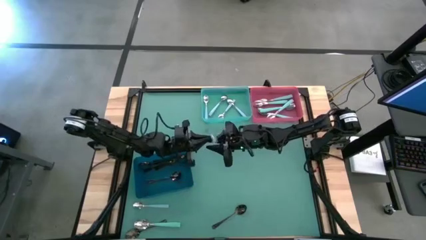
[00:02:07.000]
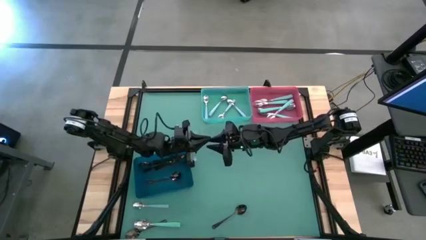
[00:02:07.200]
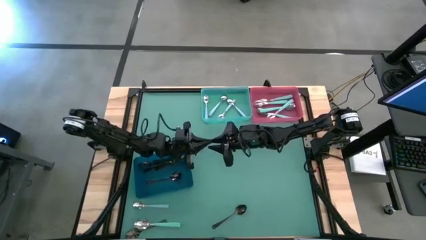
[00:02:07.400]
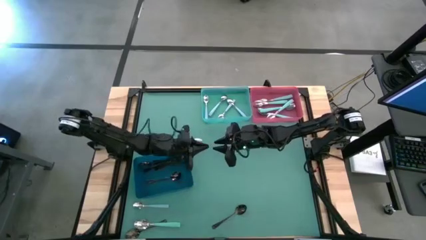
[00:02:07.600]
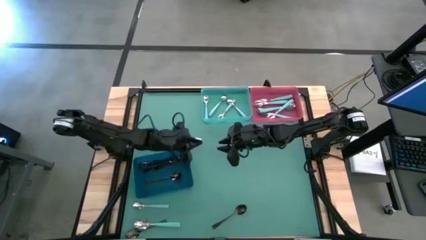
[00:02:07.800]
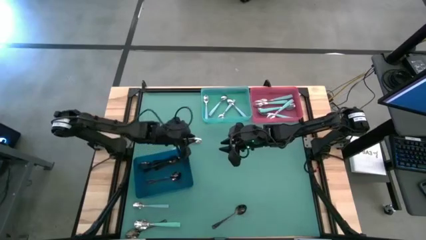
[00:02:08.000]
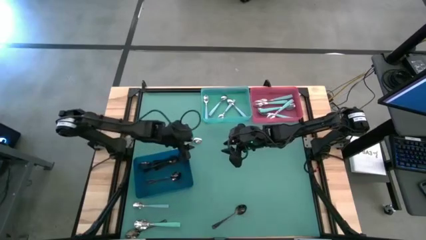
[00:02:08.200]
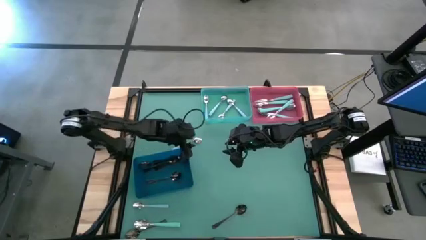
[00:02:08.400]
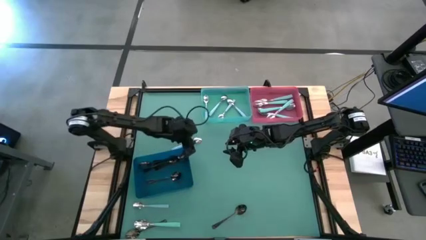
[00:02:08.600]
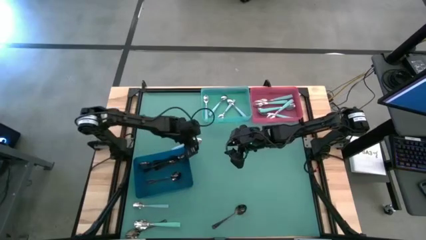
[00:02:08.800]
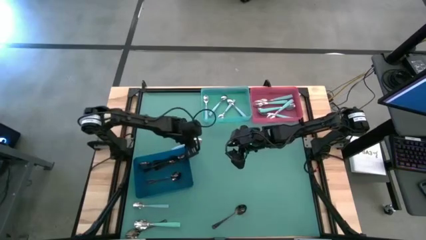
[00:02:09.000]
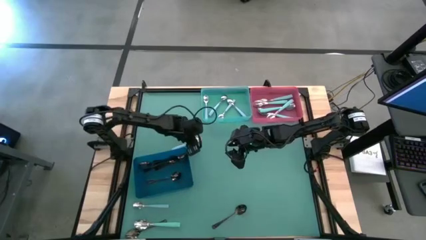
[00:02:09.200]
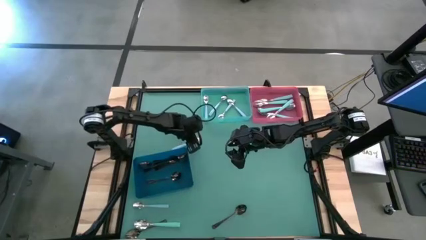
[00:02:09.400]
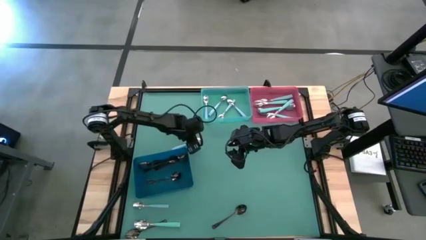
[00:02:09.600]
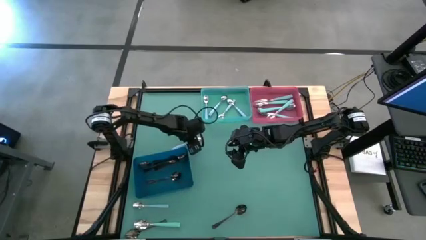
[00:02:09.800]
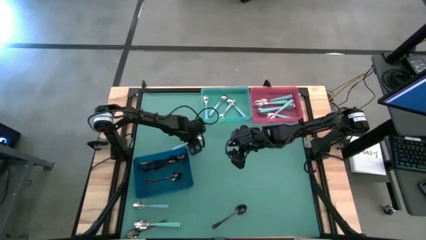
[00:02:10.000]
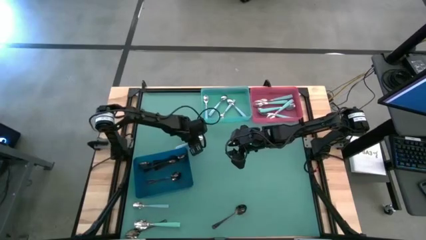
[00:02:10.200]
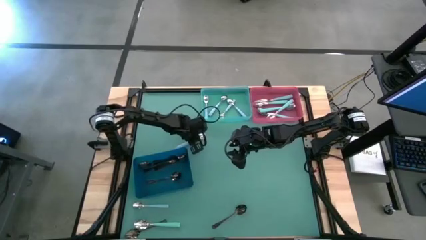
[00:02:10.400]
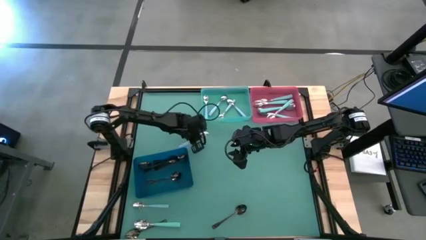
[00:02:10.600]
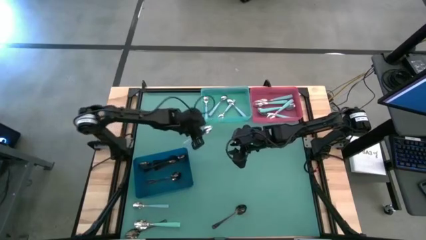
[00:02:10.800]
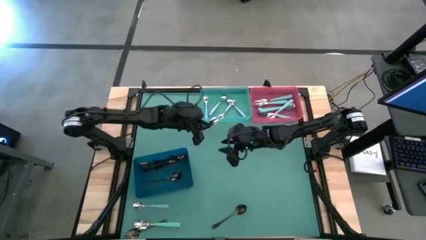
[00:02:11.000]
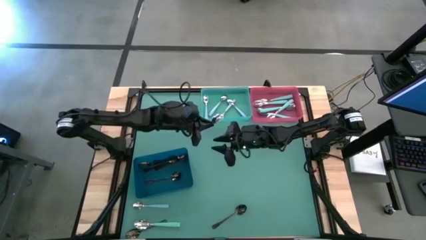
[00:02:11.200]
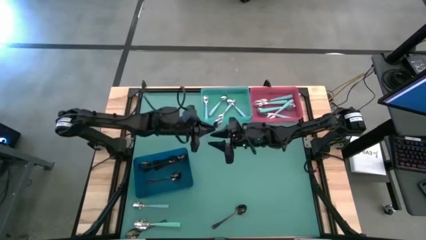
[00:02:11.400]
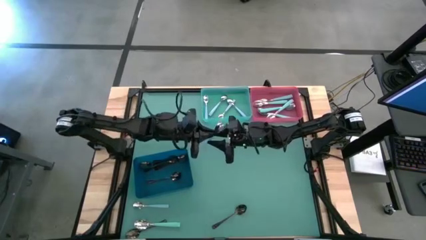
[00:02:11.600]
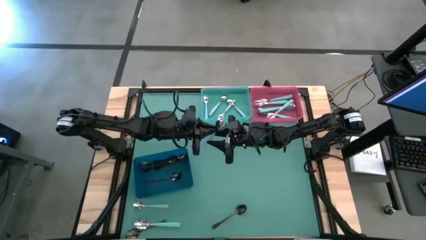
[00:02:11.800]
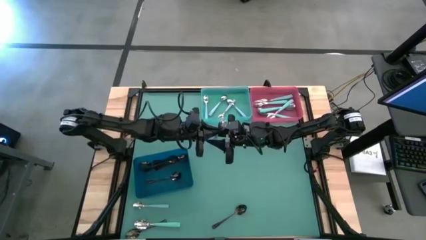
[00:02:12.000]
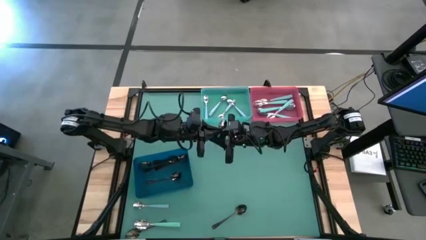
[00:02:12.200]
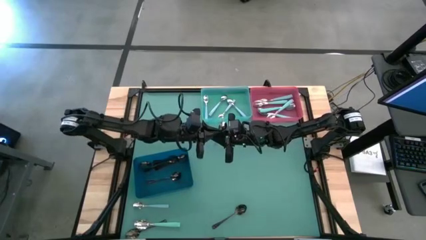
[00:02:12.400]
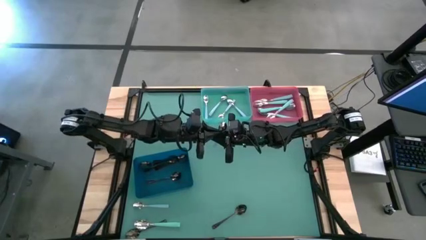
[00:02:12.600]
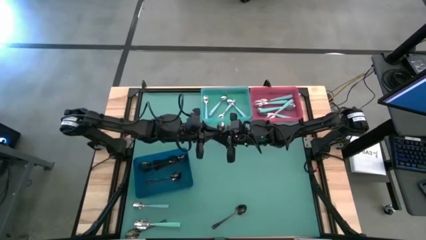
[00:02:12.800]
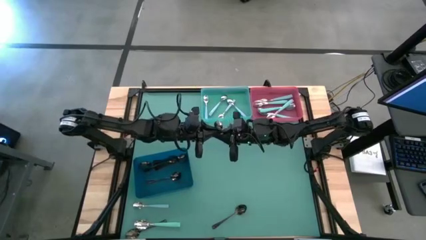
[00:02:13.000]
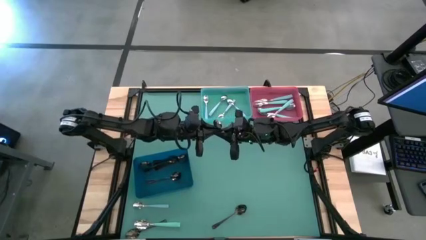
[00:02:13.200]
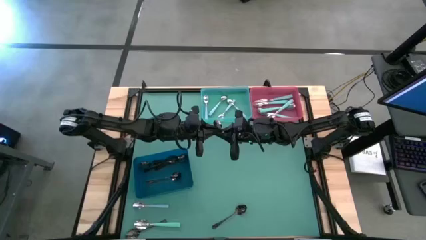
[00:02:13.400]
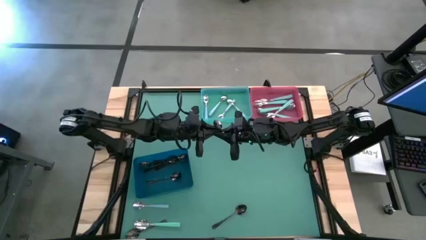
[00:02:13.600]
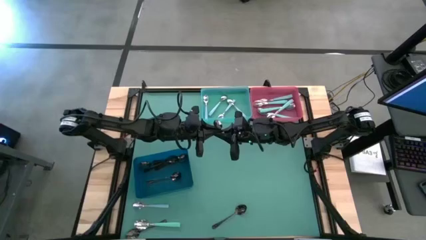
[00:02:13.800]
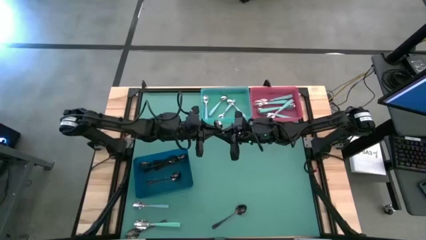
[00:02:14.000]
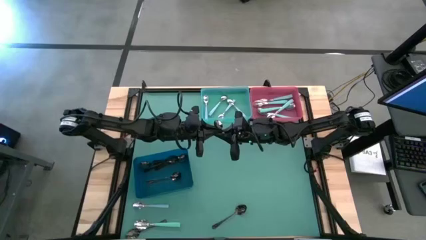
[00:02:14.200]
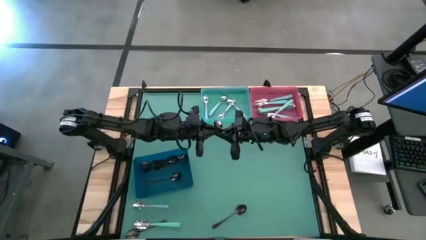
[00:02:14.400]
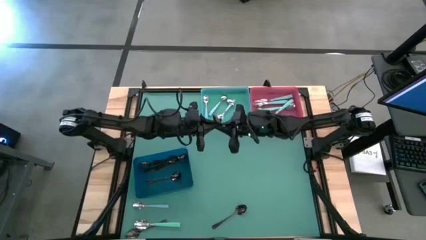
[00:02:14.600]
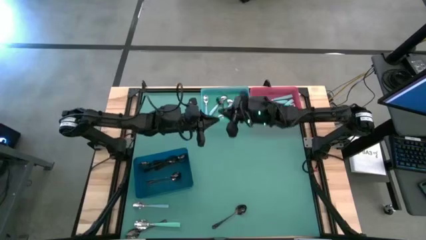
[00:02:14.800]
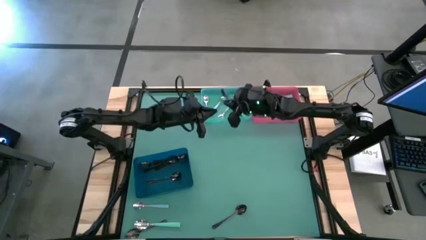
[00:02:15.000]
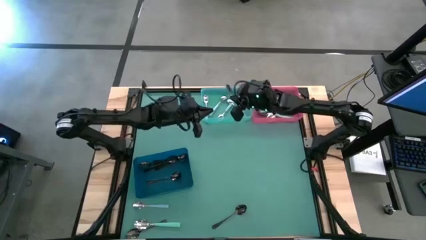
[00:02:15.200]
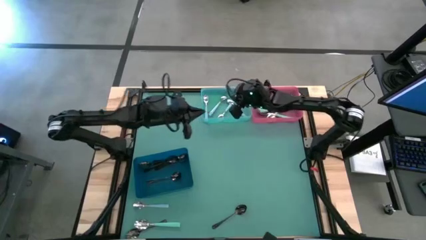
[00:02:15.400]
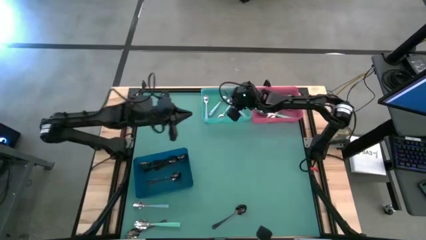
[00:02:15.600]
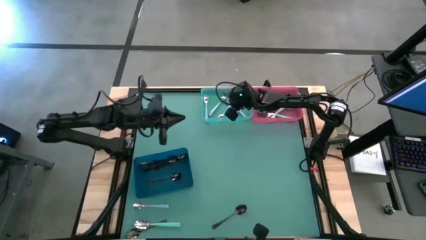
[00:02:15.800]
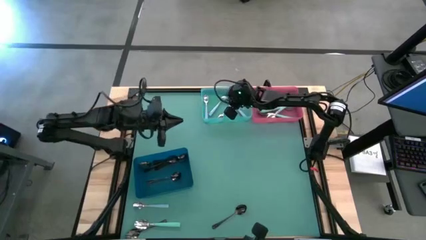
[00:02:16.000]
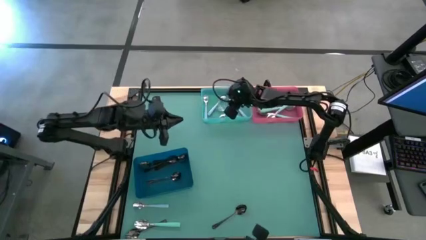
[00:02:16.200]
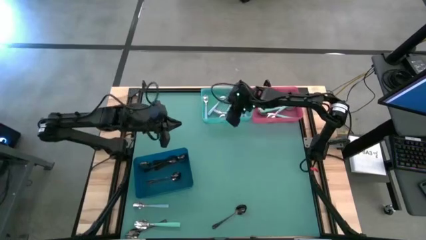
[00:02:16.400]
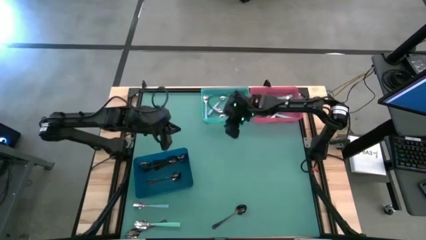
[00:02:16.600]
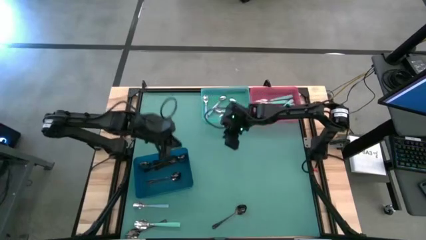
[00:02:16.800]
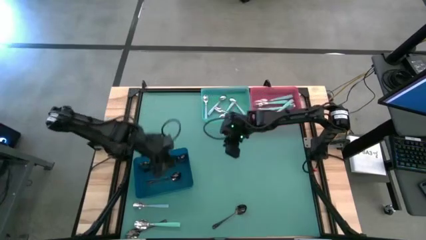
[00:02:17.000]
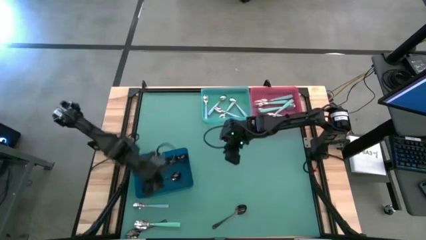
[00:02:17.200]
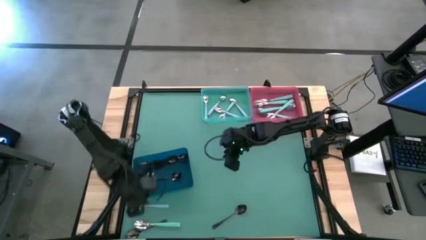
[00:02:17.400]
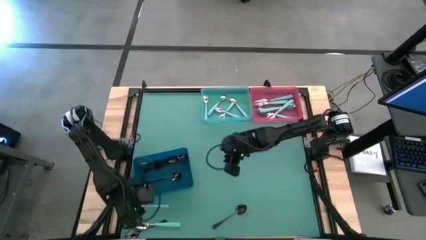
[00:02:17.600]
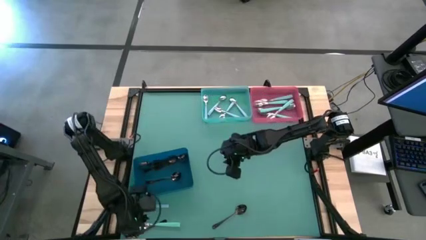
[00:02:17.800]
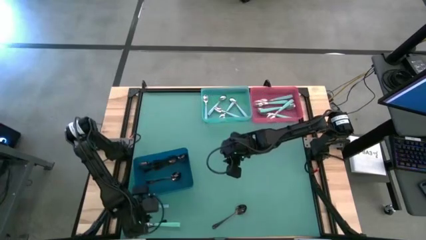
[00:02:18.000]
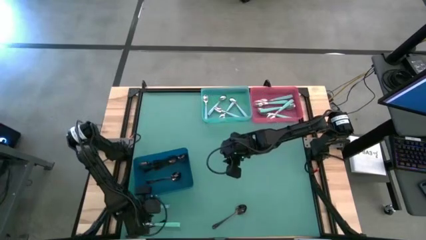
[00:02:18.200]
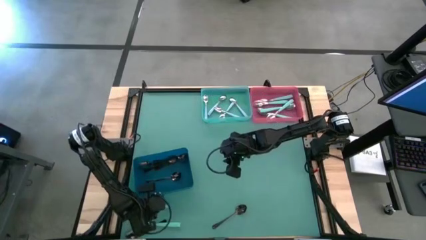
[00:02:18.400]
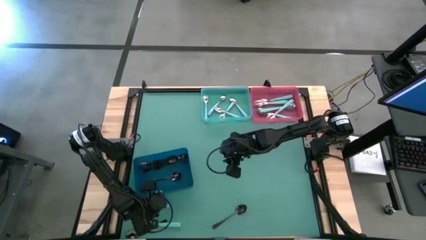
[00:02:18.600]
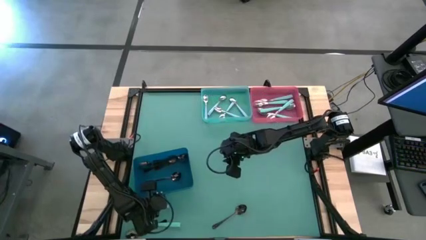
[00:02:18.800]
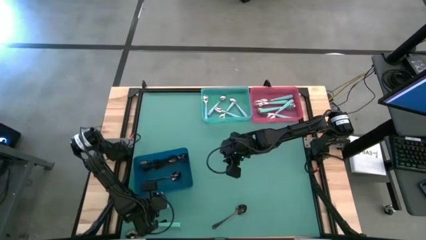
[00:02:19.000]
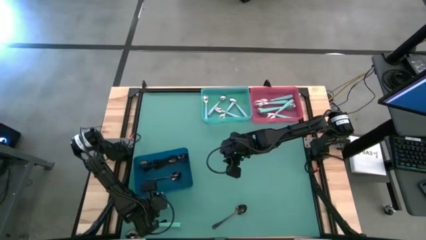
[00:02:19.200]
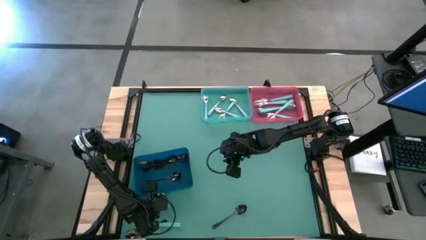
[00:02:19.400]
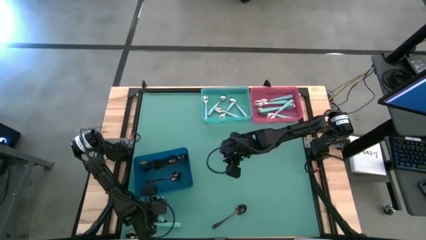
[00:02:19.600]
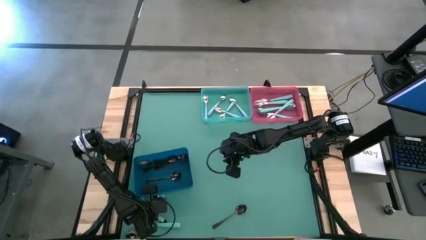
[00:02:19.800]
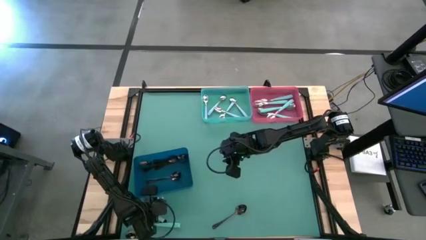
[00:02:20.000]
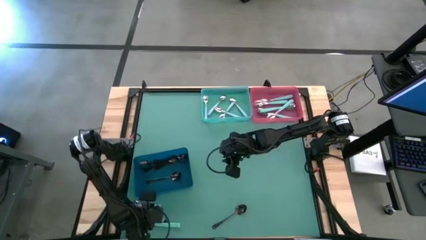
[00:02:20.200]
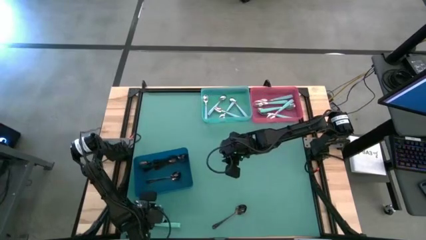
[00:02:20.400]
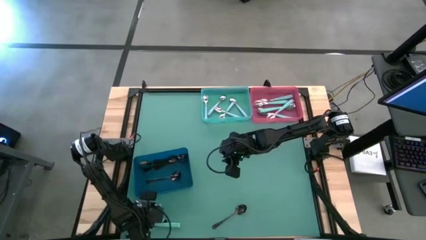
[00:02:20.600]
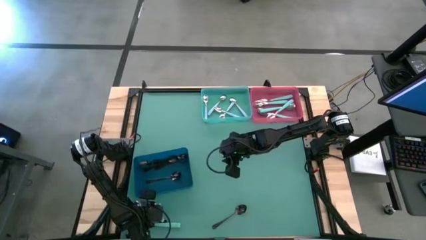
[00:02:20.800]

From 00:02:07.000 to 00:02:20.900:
Task: Sort silverware by color (type)
Put the bottom blue spoon into the light blue bin

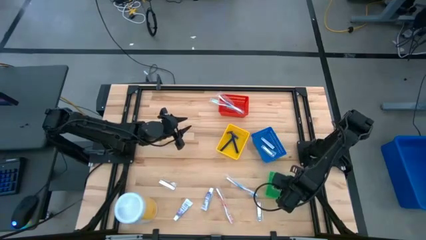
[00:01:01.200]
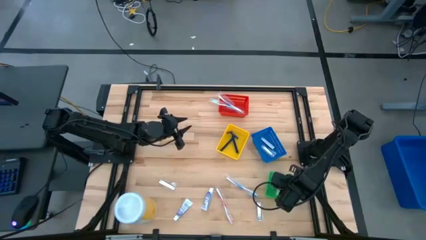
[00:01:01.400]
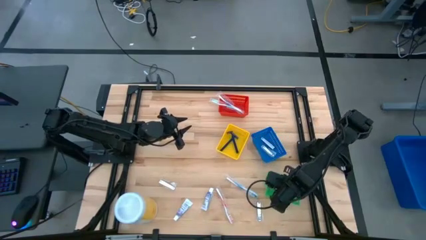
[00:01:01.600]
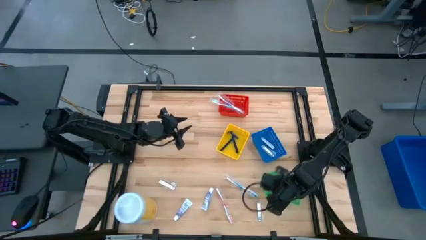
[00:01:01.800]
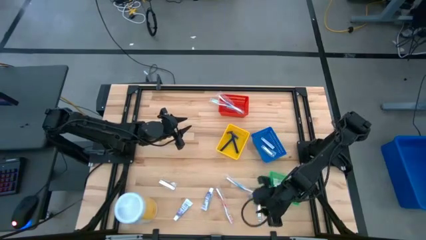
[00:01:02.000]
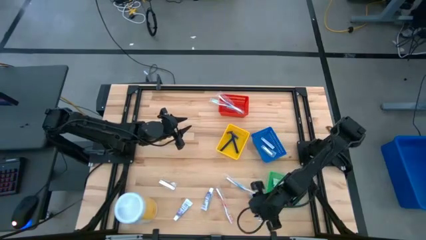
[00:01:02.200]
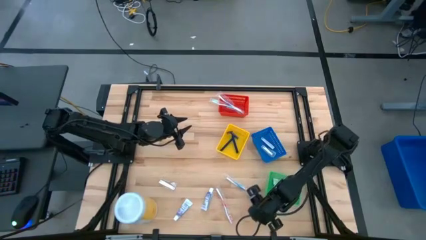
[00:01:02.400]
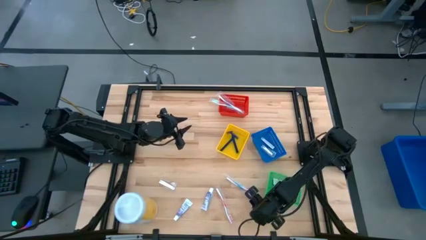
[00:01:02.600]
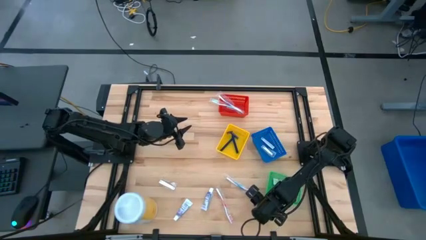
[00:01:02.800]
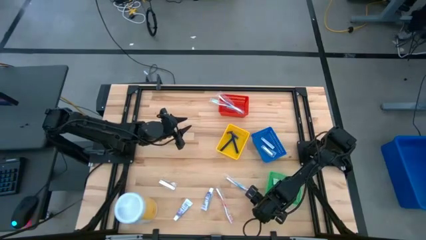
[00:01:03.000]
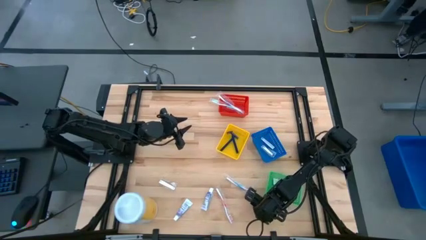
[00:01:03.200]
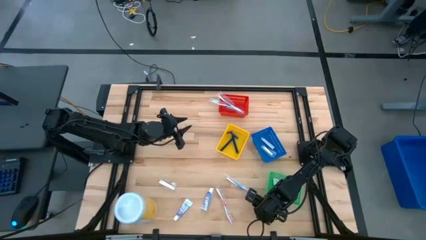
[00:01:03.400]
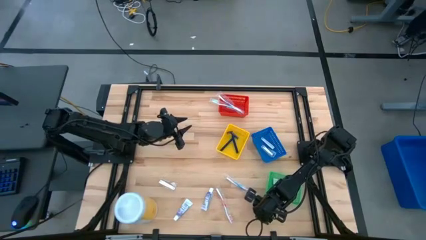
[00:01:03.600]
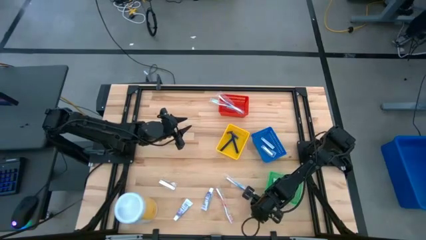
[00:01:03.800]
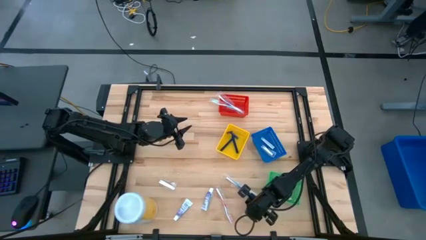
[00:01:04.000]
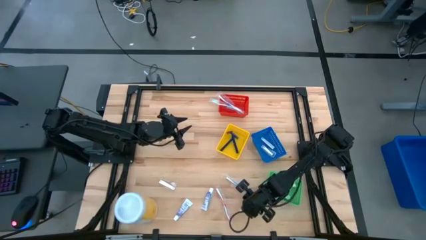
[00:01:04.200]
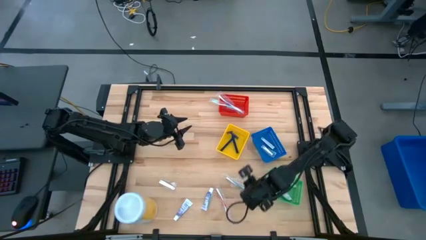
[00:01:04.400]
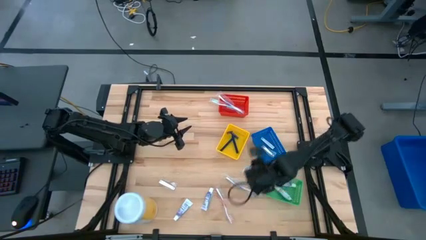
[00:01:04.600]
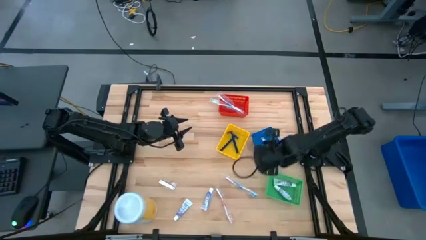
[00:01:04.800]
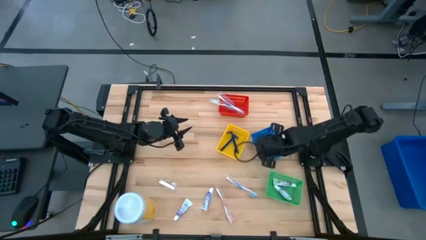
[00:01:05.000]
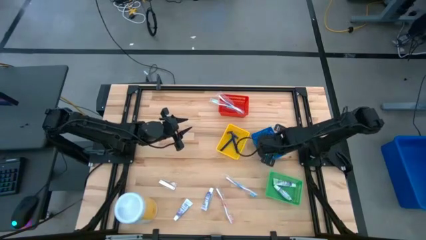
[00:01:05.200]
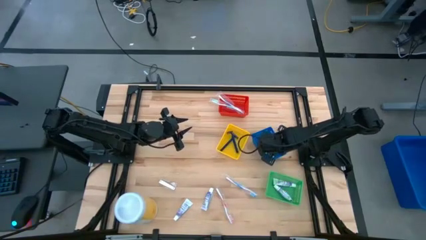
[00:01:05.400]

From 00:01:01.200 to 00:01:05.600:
Task: Pick & Place Travel size toiletries
Put the nail cutter into the blue bin
